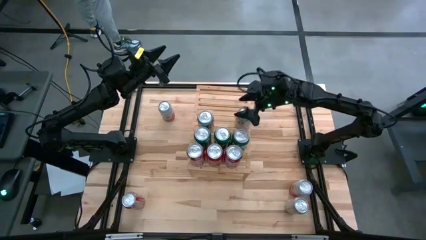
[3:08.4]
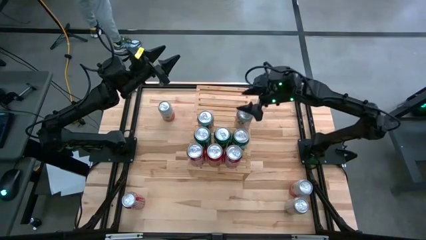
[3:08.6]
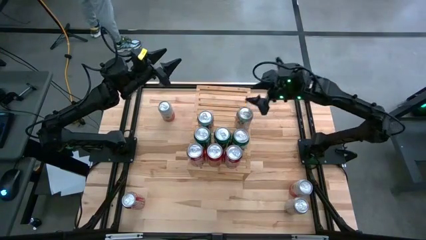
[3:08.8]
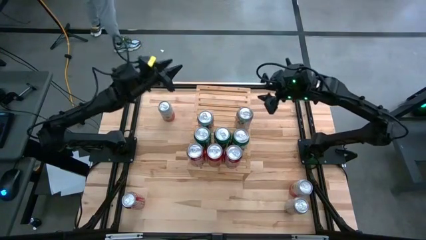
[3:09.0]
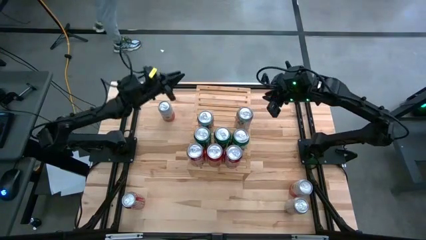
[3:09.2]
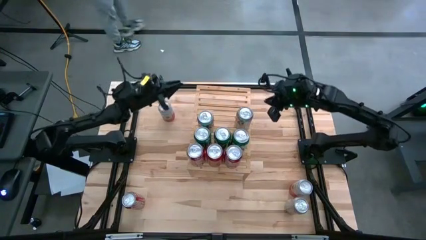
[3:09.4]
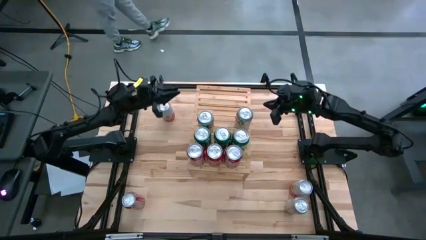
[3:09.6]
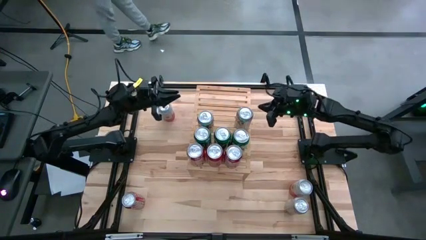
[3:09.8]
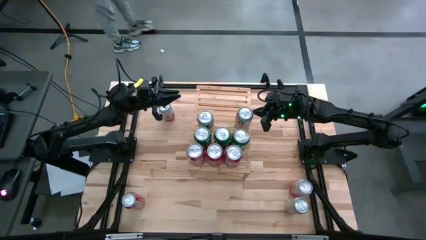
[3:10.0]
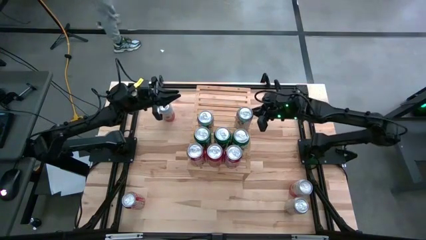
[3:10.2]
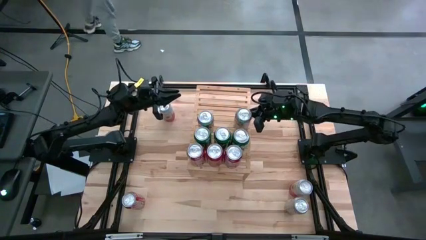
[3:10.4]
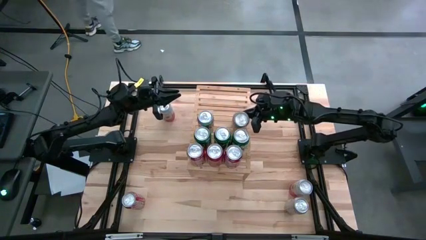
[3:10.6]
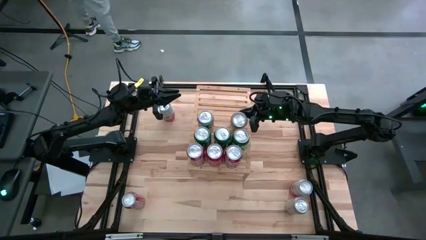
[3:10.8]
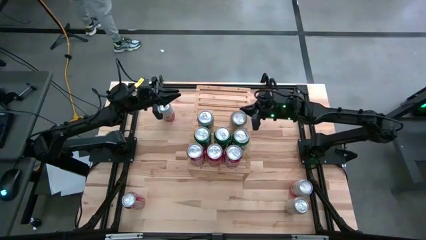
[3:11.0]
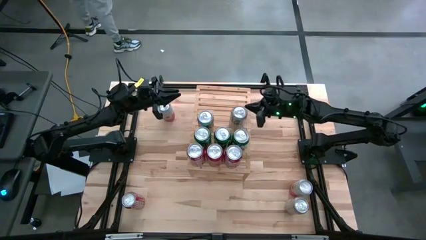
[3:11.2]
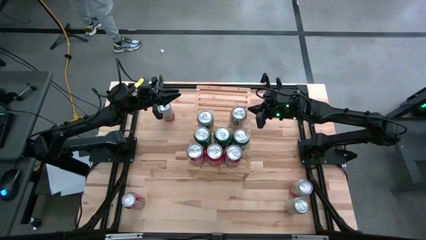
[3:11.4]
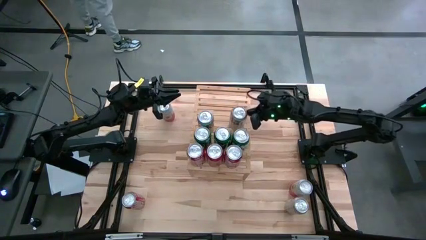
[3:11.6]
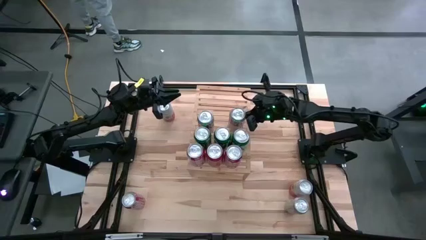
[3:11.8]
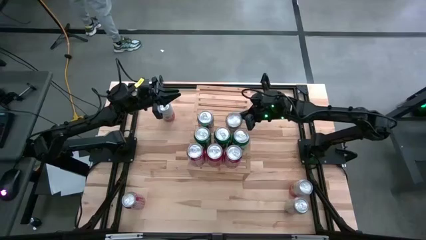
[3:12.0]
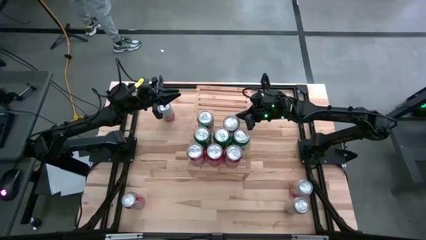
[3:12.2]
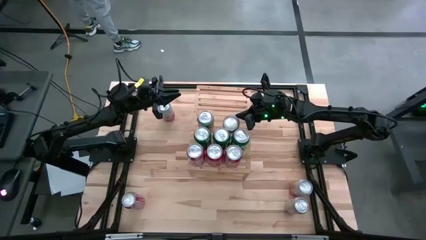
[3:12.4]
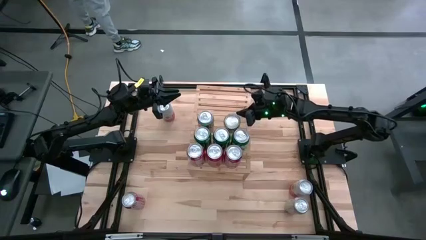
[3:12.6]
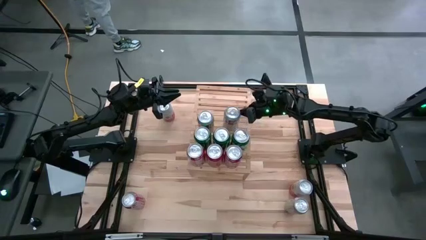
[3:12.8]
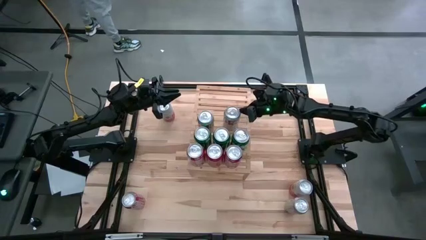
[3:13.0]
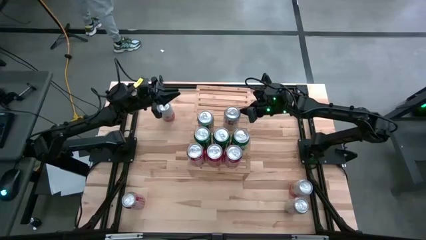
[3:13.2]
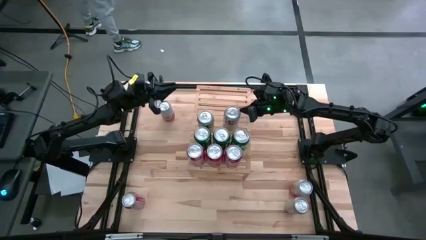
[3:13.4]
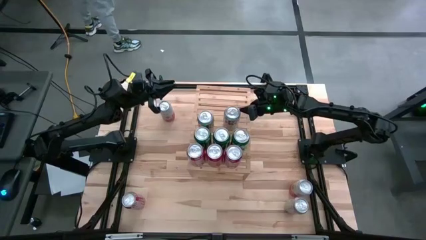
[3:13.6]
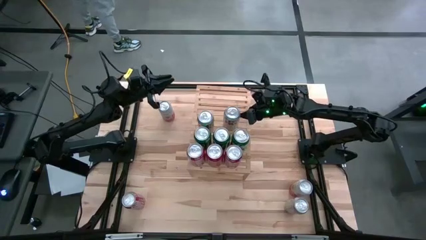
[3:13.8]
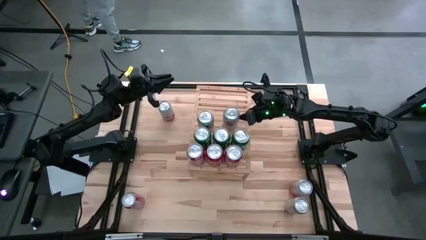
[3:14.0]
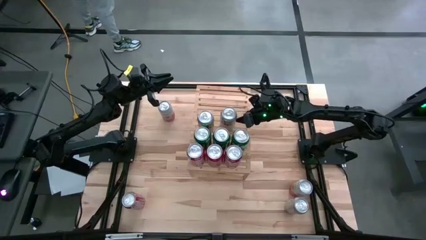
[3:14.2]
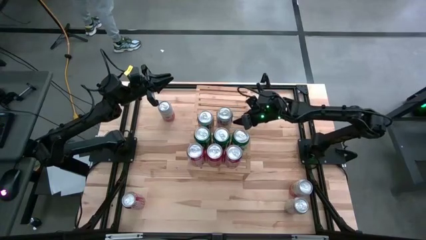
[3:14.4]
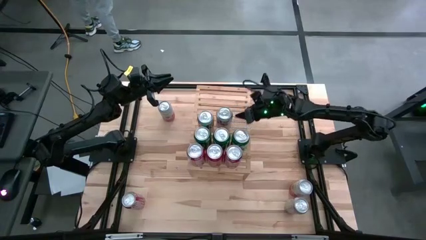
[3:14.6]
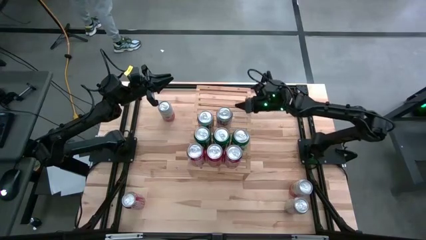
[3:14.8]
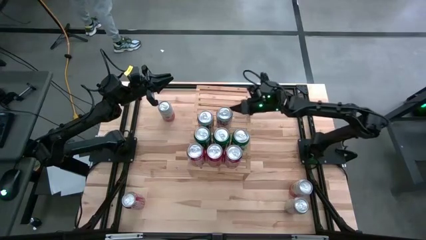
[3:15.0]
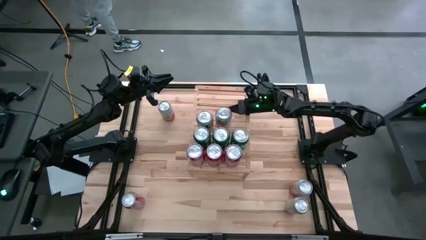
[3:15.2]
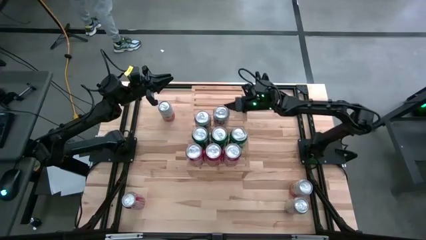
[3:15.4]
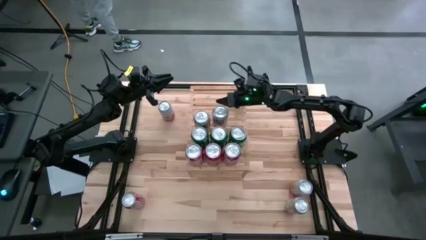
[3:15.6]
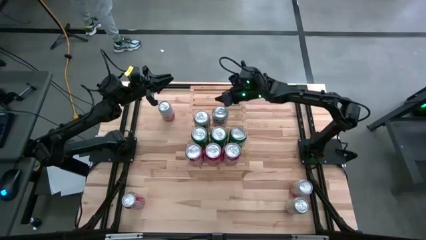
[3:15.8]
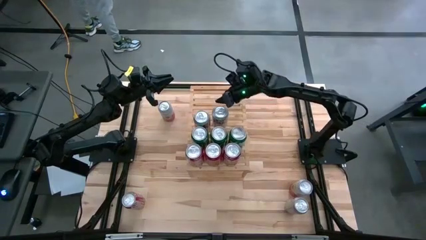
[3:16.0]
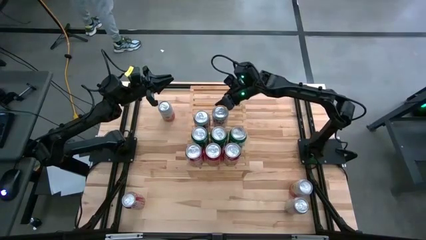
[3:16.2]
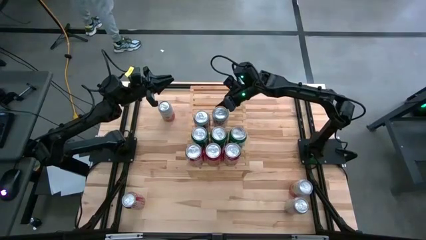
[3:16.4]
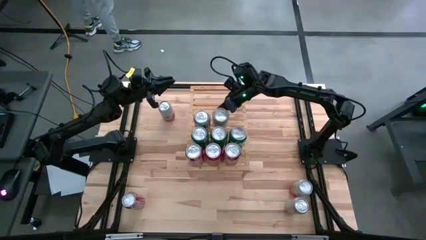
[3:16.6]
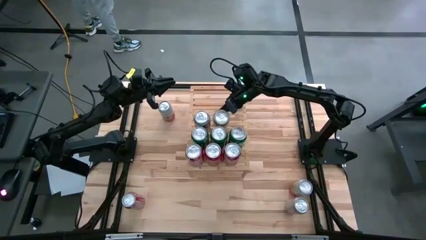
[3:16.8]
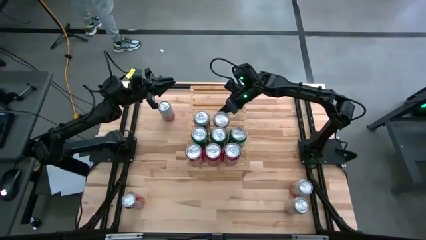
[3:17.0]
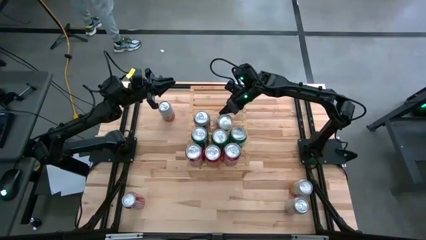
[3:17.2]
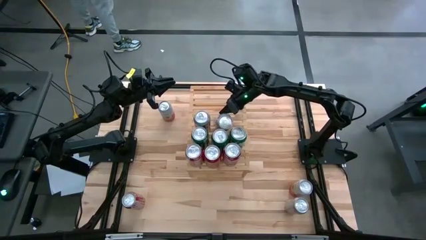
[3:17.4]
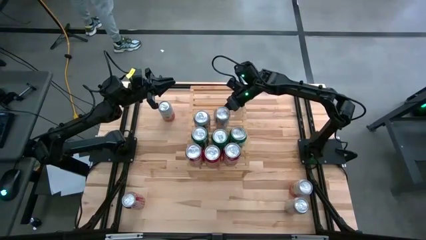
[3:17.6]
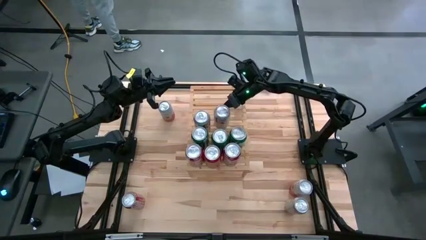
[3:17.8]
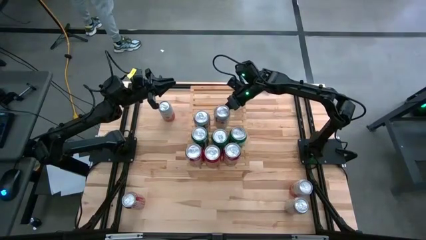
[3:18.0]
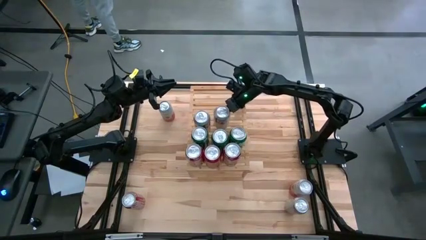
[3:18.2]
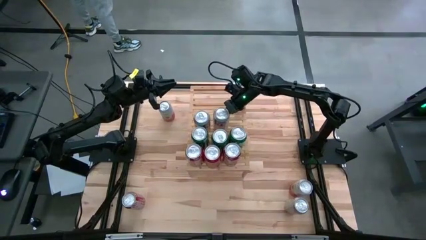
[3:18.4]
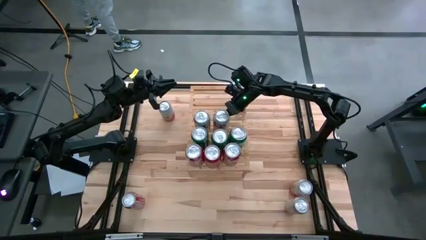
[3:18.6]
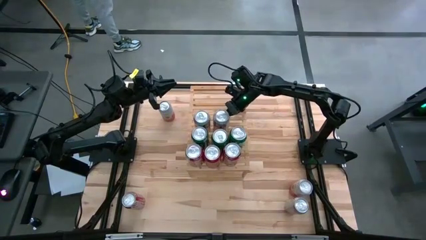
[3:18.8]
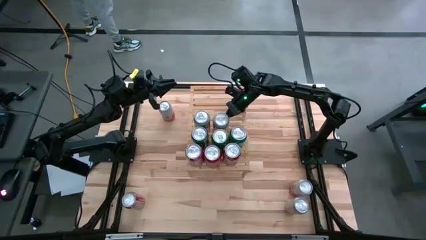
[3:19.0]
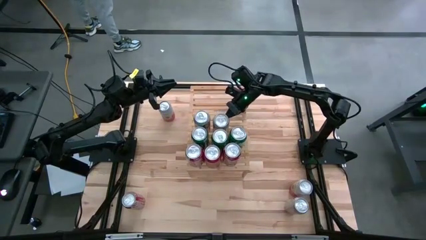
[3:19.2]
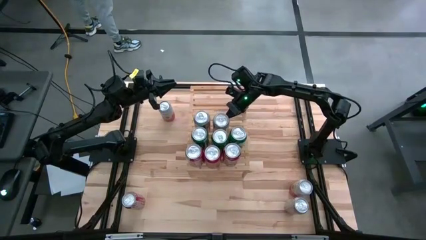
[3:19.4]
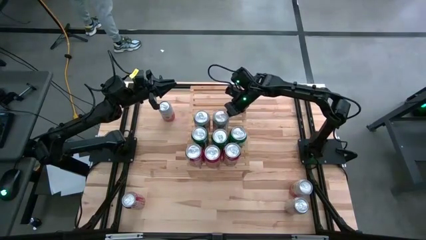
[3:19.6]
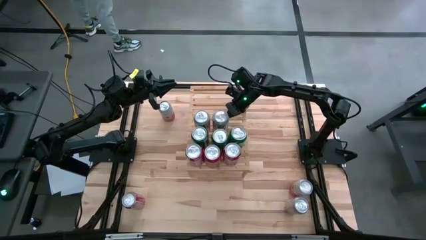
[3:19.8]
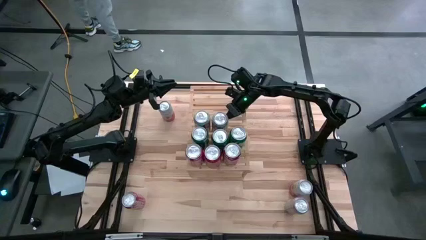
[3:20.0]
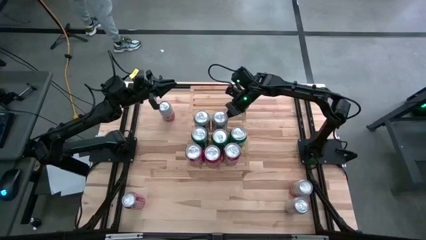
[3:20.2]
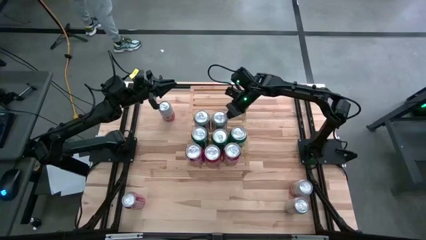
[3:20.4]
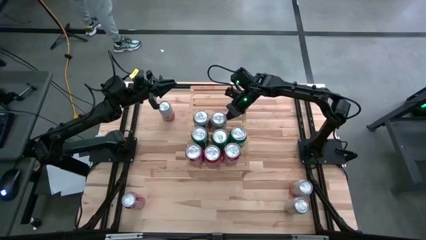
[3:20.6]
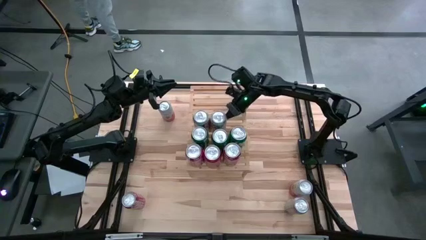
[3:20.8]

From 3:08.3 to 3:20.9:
Task: Place canned beverage on shelf
Put the top red-silver soda can on the shelf aligned with the other red-silver soda can
